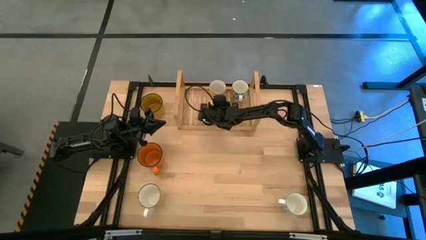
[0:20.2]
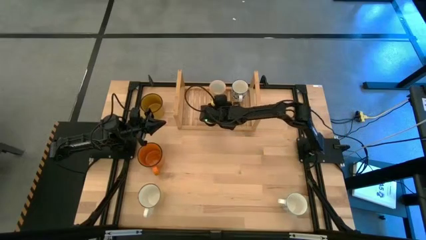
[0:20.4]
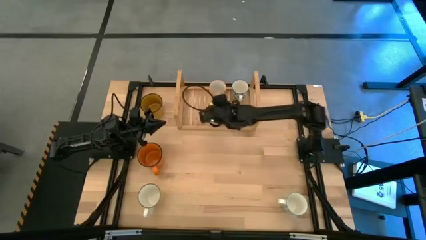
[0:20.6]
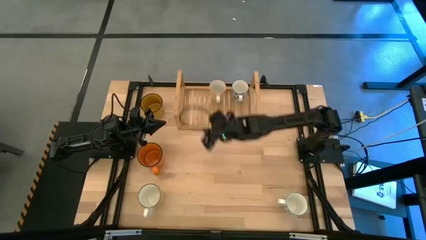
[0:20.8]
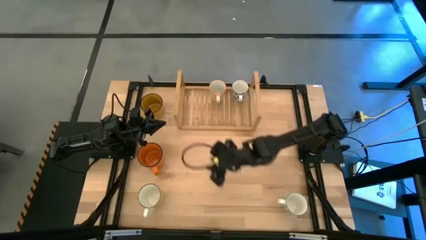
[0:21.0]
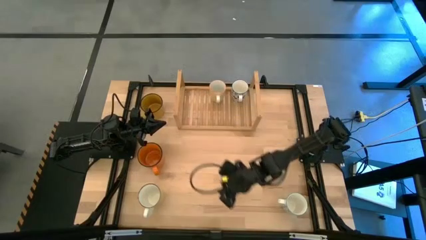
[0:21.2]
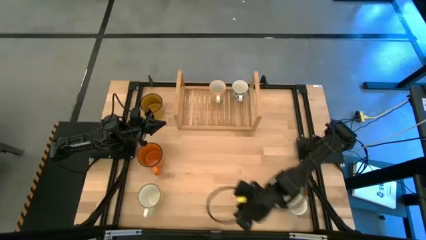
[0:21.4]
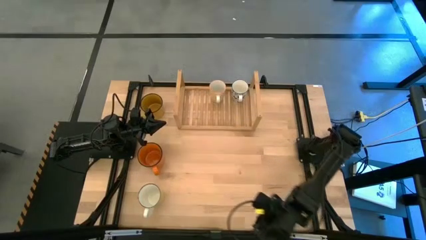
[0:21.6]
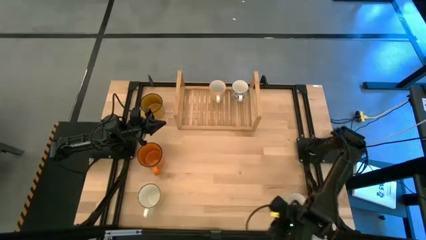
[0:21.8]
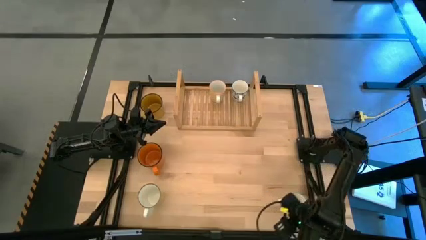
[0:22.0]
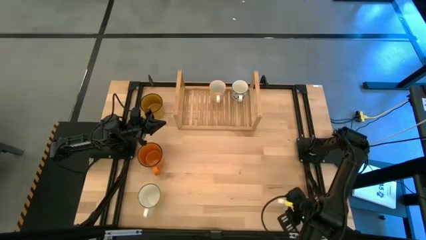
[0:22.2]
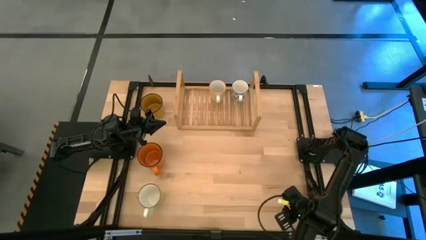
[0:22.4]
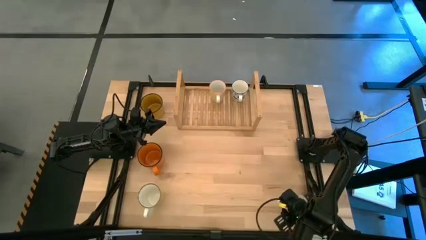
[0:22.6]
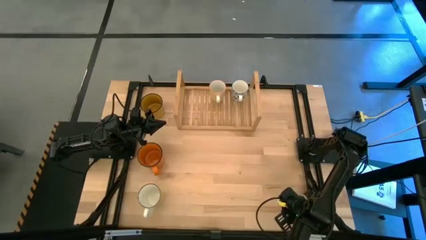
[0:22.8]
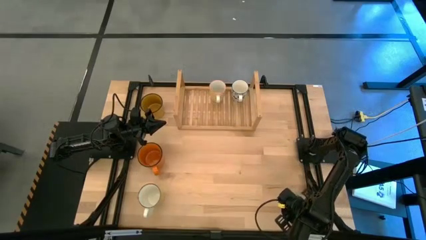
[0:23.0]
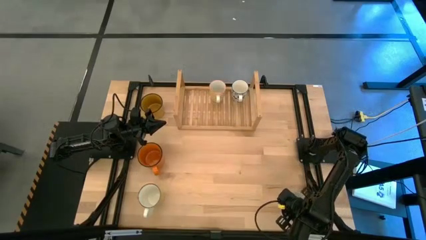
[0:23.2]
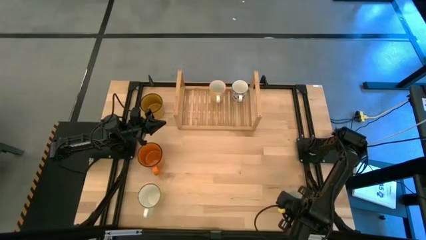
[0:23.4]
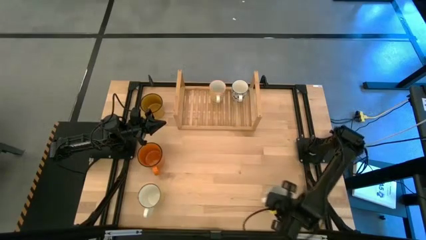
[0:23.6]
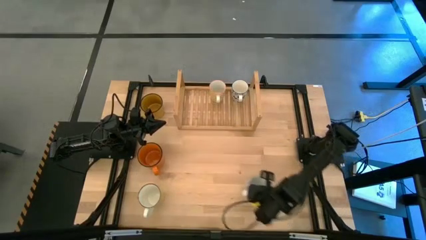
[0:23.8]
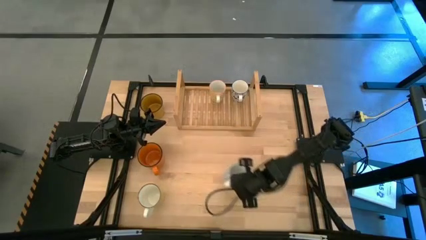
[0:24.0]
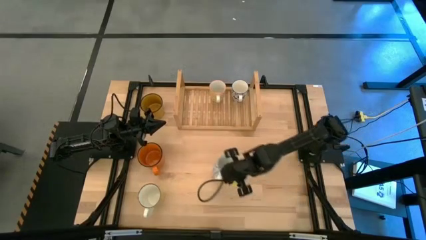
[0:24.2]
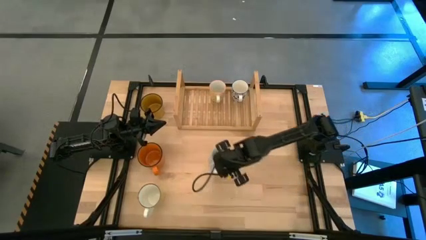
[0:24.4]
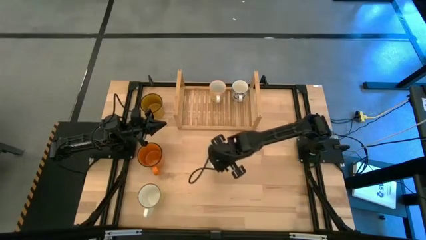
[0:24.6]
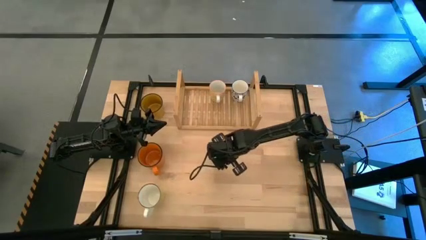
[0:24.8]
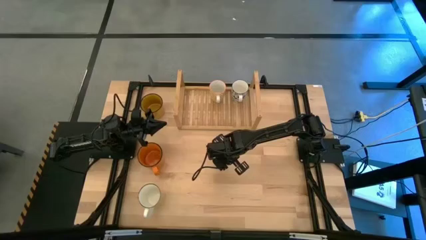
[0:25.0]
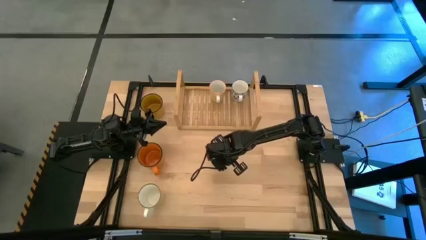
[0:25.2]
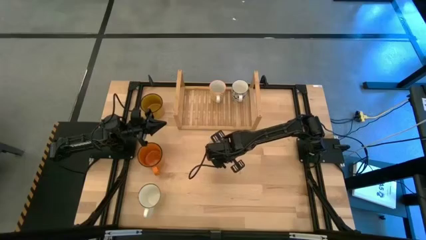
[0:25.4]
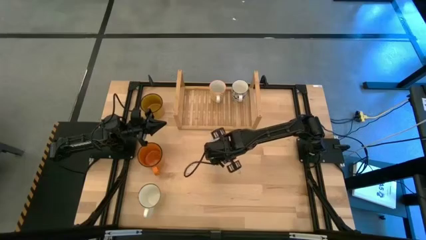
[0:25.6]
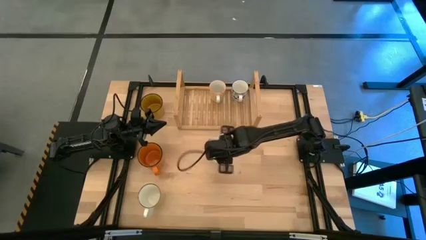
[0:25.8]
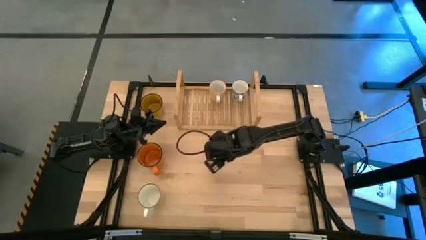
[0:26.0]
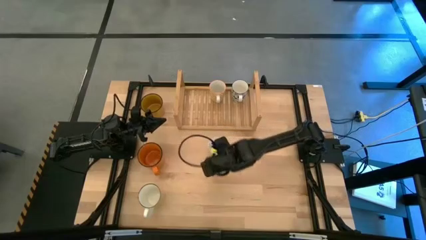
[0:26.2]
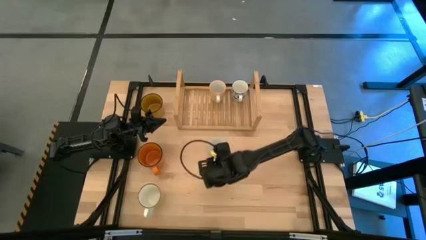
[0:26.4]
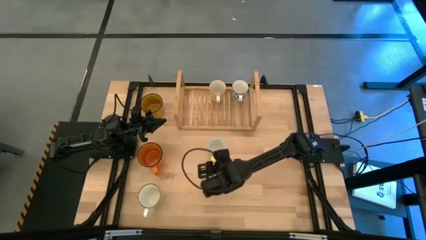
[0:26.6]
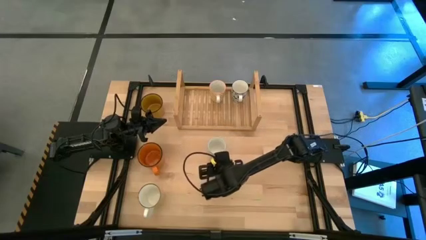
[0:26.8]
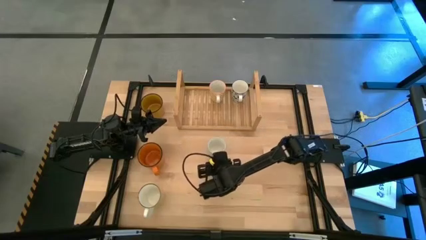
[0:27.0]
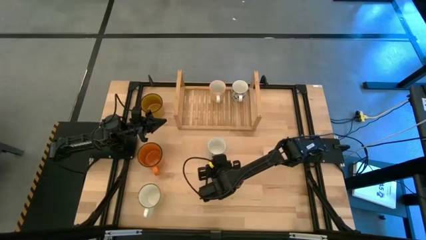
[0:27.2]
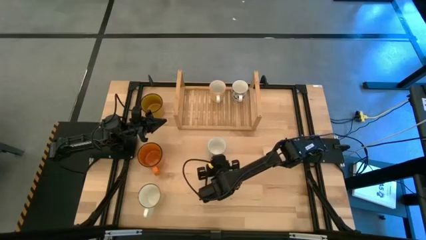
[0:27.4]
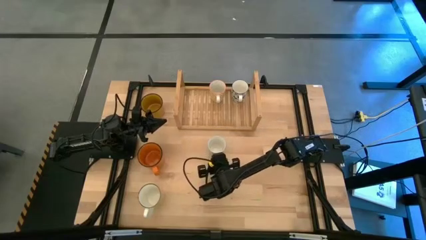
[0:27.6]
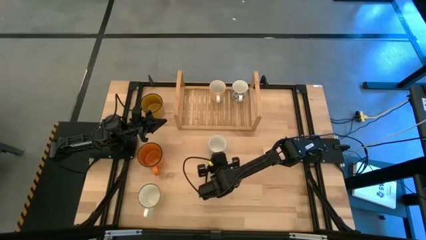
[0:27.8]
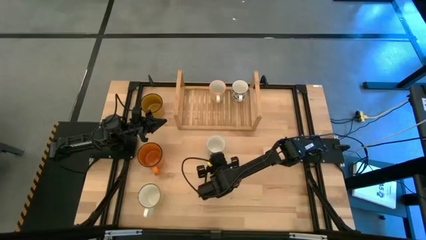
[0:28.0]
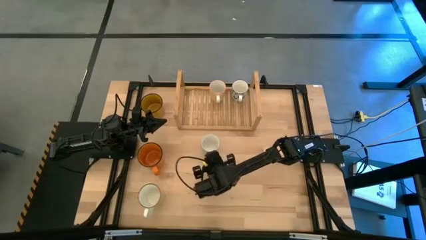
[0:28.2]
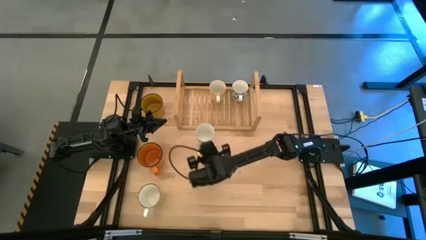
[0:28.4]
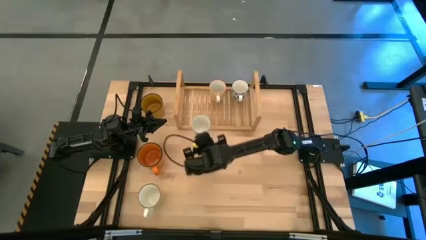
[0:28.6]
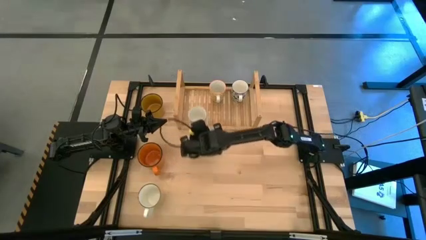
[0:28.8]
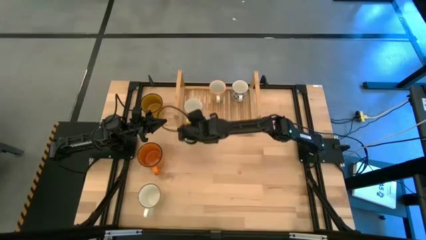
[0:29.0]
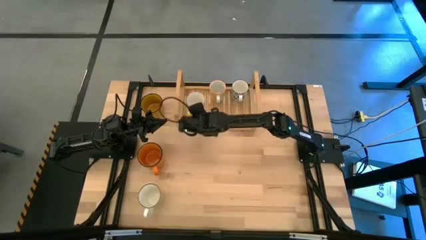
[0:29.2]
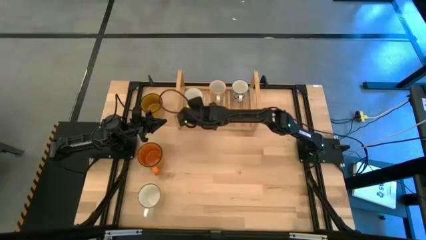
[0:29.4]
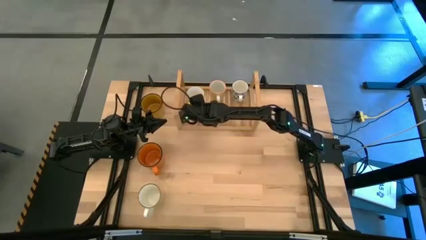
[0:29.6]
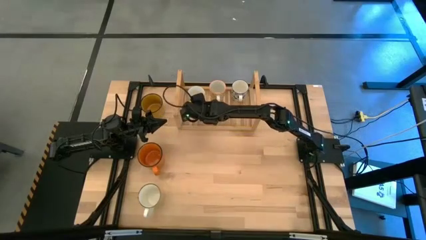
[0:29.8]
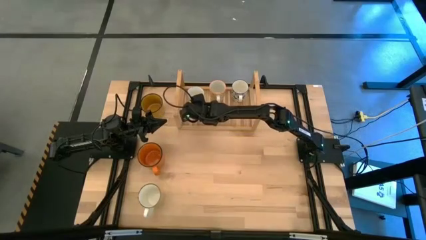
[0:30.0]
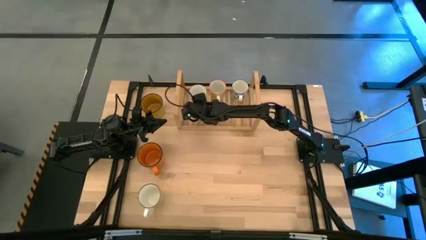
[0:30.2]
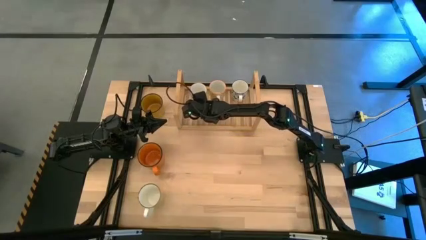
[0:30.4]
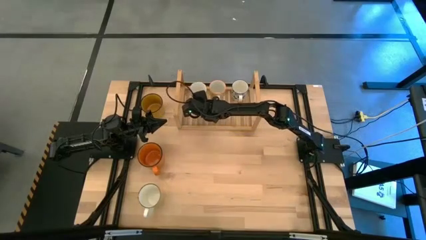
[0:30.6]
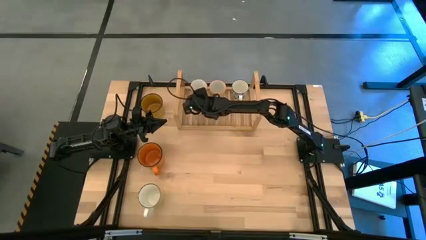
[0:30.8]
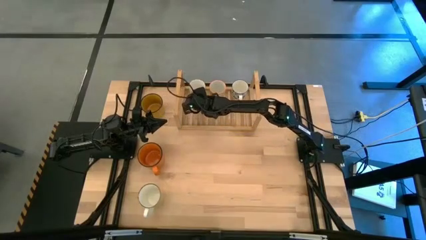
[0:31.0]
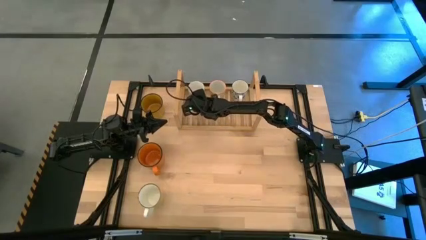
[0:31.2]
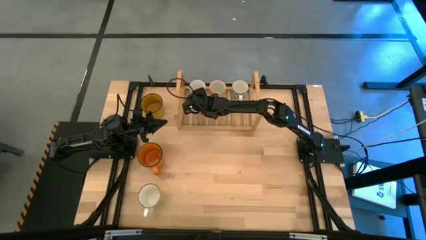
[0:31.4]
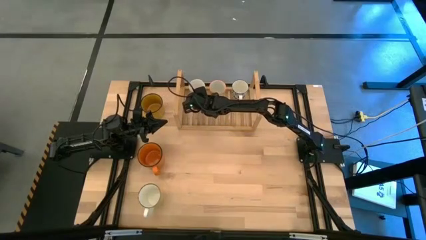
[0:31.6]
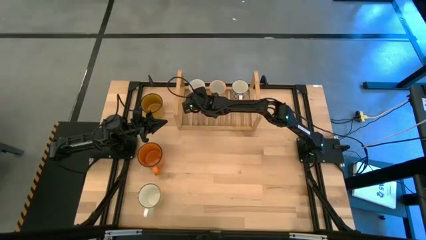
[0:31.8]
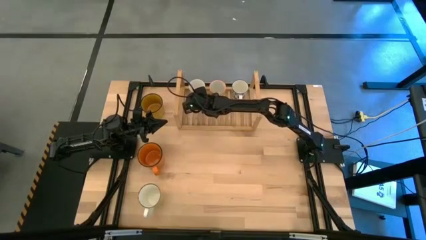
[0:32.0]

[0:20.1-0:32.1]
Task: Place coffee mugs
Put the white patterned mug on the shelf

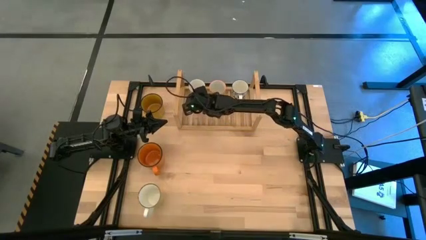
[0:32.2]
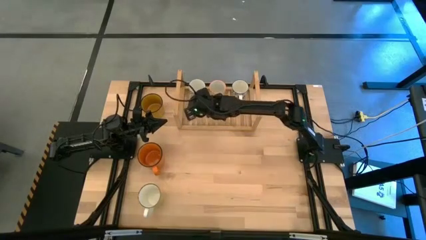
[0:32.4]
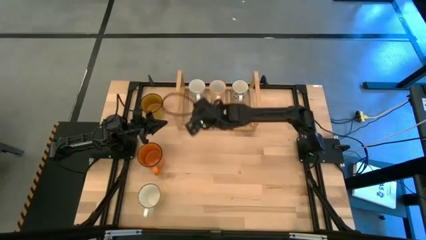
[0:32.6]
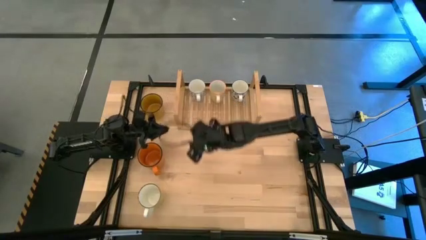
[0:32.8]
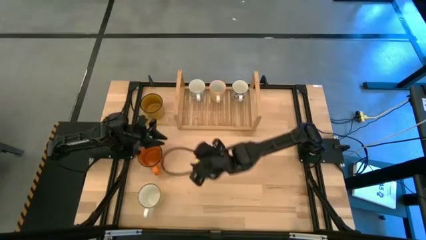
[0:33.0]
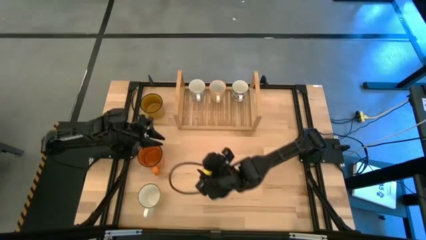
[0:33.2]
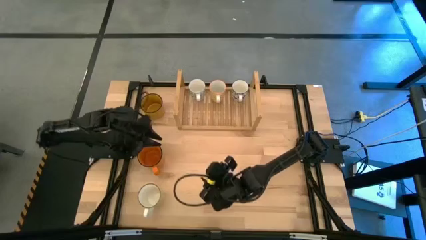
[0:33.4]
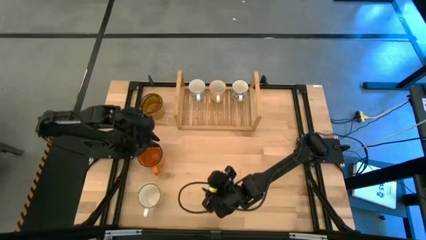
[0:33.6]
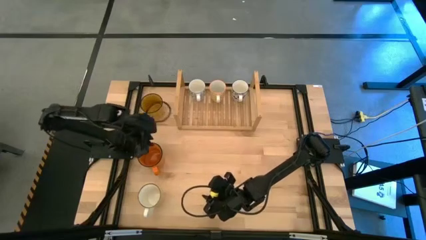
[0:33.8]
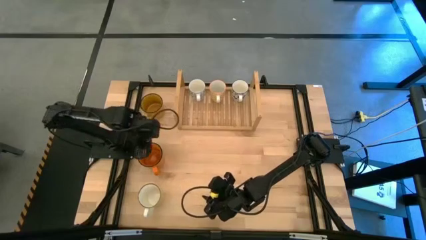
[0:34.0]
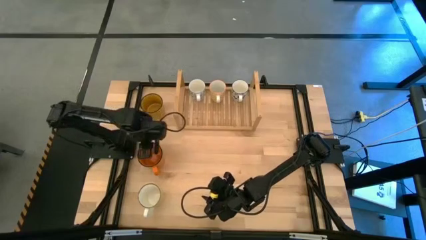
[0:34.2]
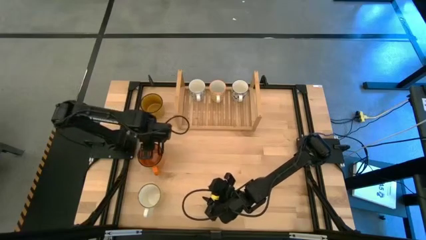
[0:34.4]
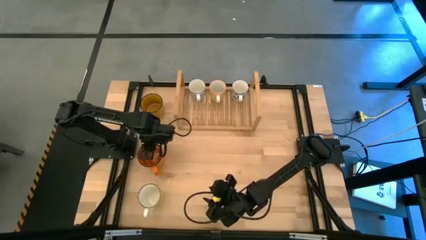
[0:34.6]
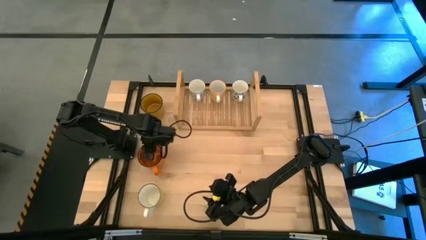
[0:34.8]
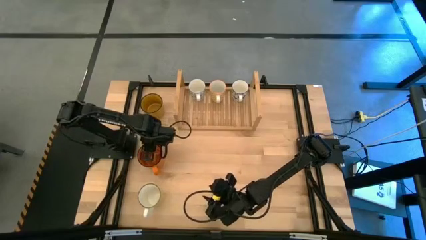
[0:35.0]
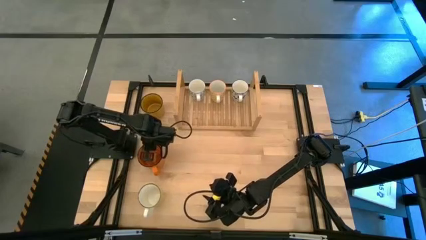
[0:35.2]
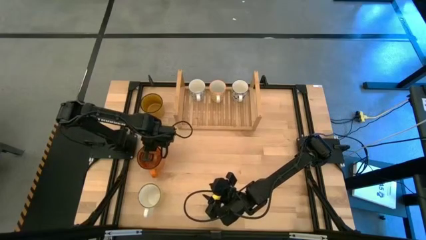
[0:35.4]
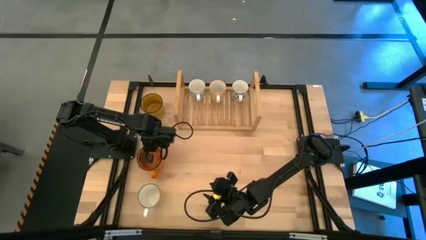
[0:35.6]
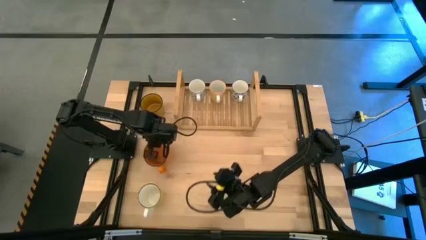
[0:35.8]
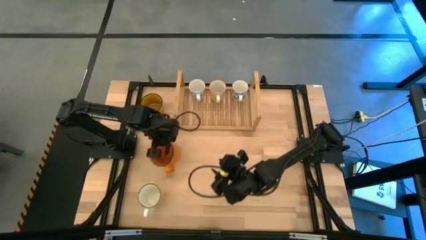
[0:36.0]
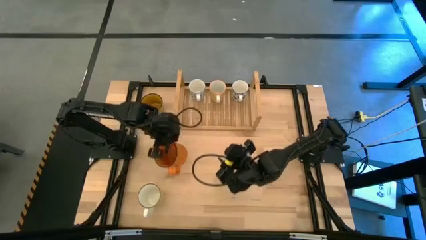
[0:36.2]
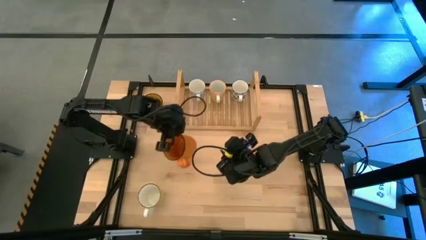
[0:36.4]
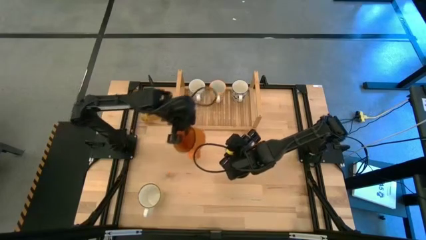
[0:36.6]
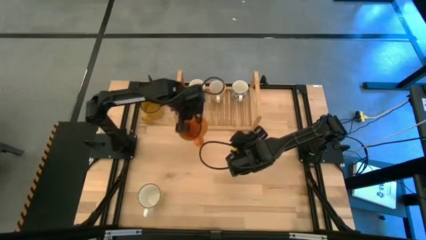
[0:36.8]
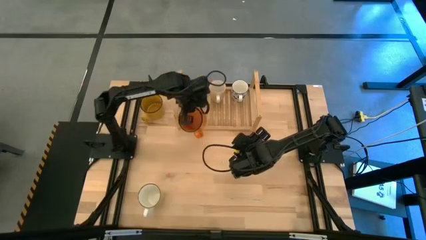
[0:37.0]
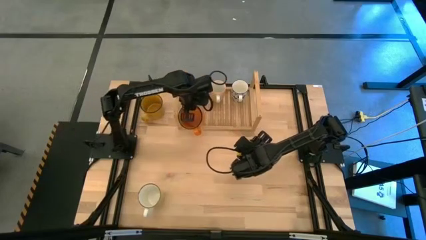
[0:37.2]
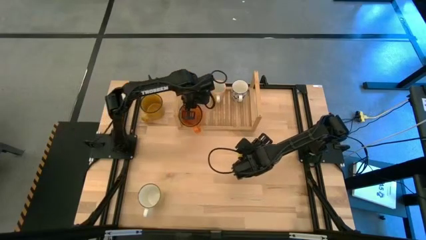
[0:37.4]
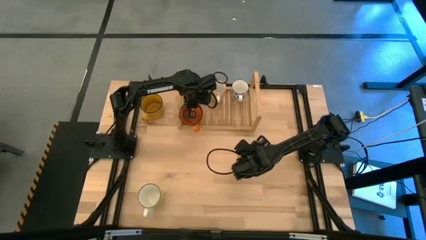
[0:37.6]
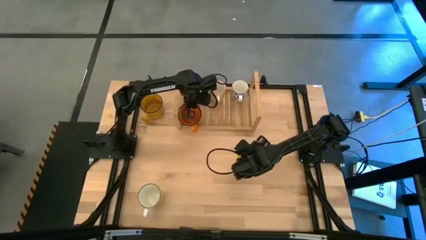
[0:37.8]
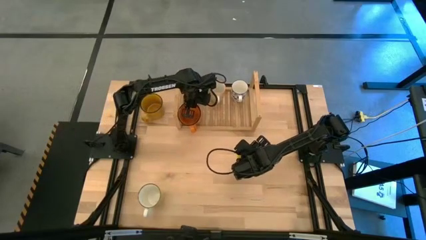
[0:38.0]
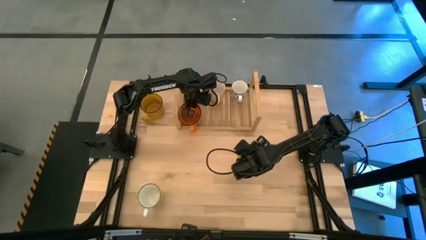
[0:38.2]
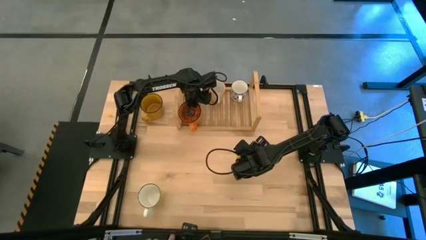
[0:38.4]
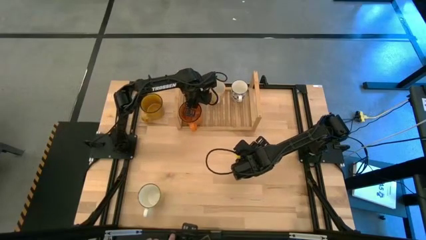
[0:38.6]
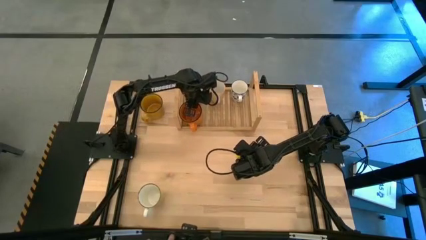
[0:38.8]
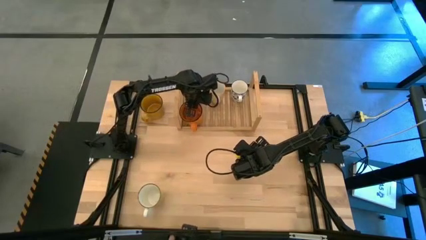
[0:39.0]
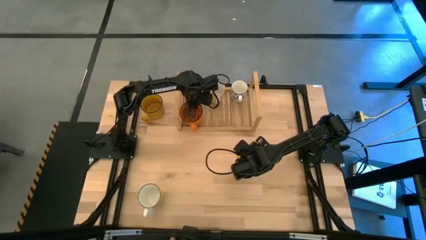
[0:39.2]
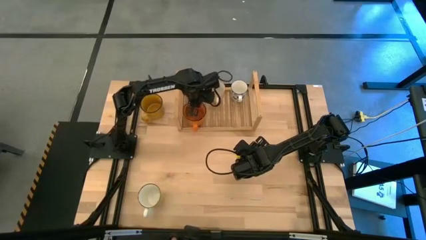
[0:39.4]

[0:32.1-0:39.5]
Put the orange mug on the shelf
